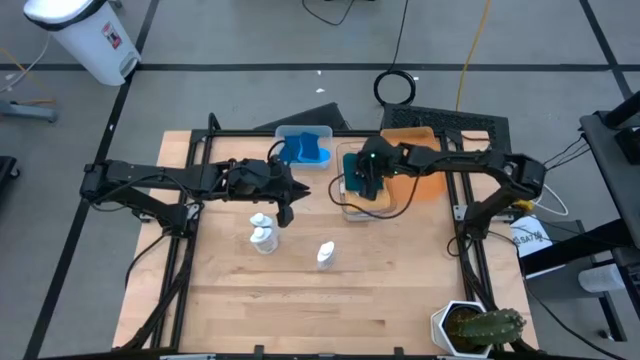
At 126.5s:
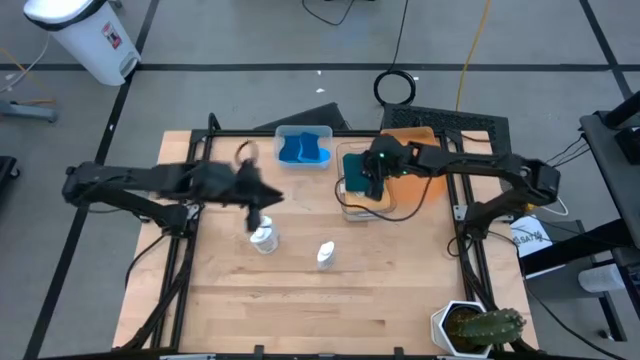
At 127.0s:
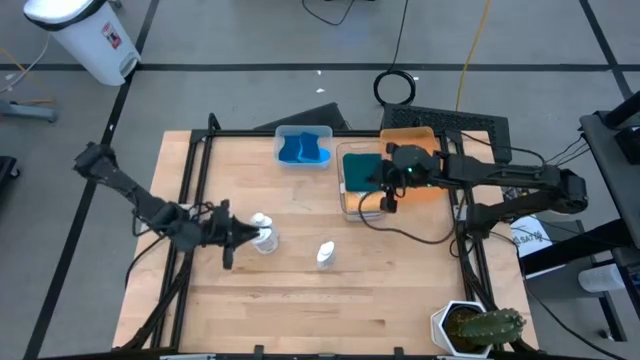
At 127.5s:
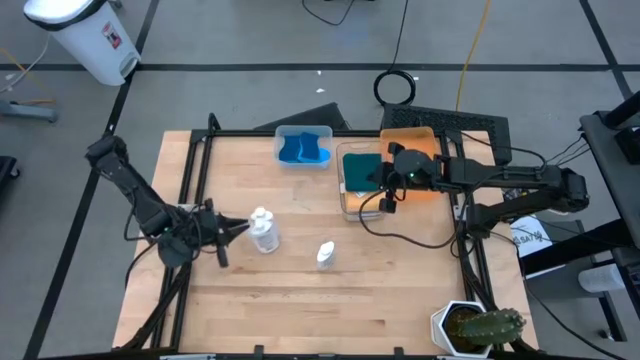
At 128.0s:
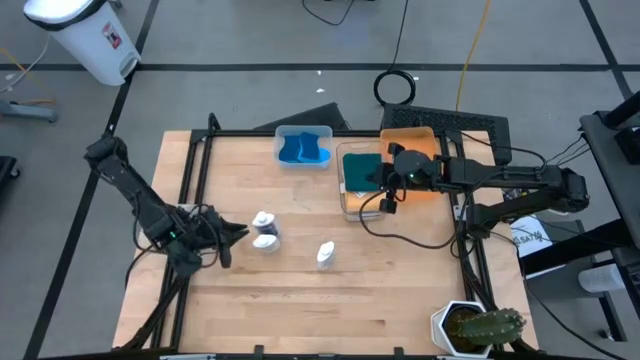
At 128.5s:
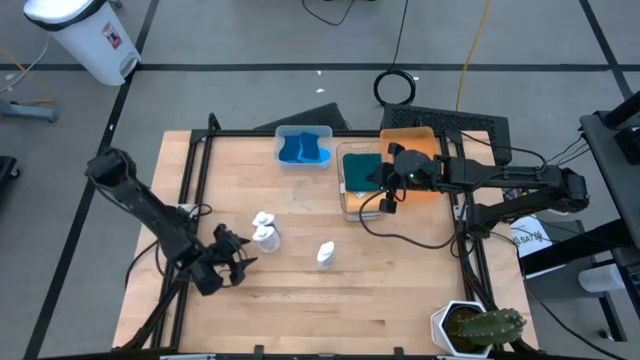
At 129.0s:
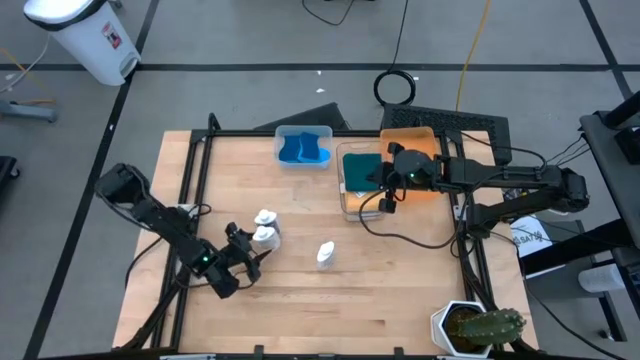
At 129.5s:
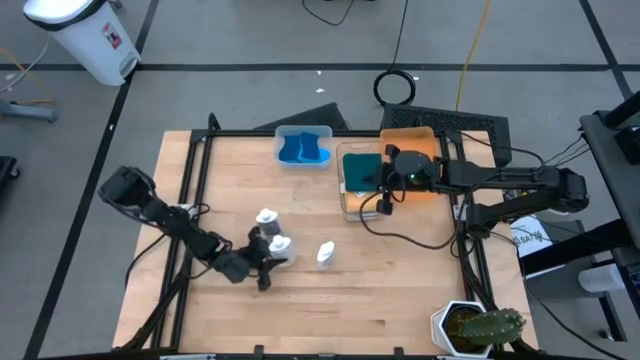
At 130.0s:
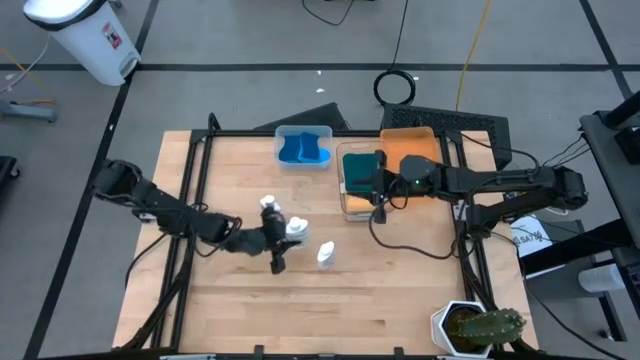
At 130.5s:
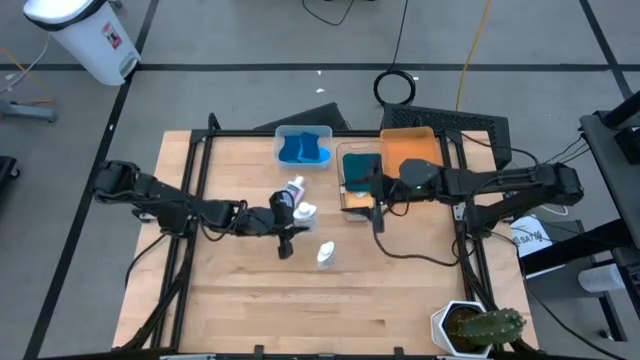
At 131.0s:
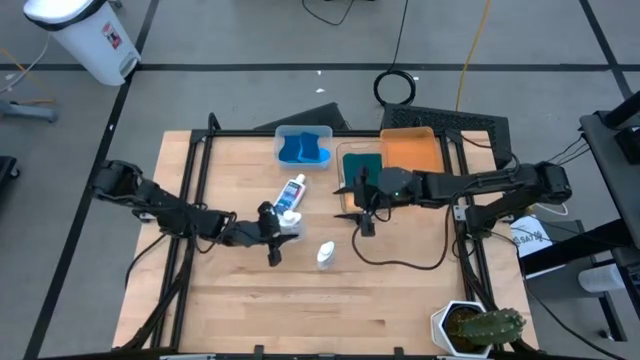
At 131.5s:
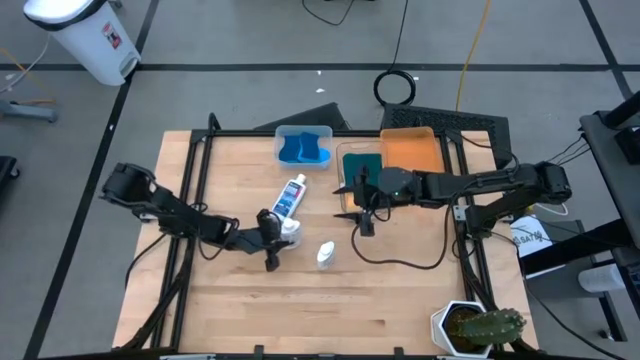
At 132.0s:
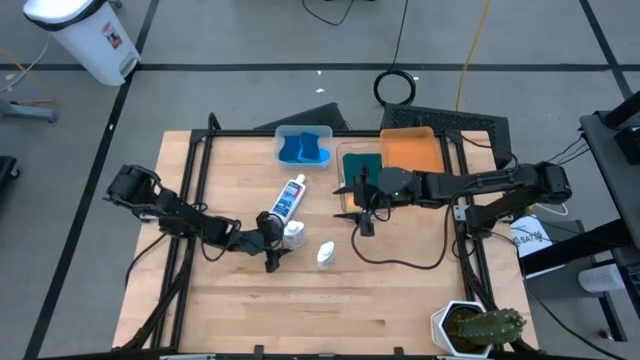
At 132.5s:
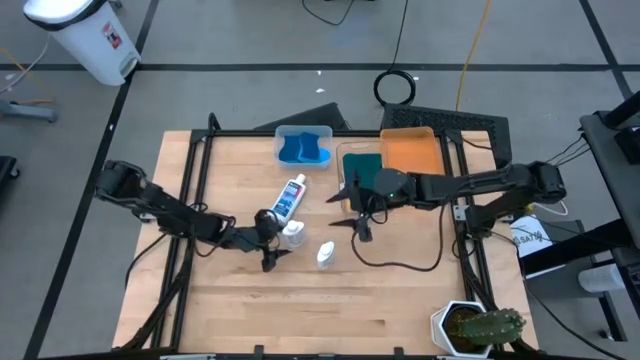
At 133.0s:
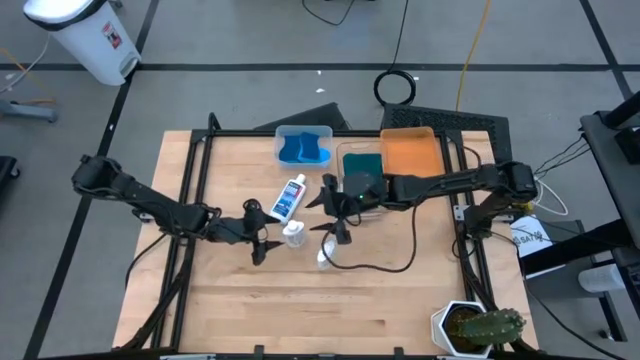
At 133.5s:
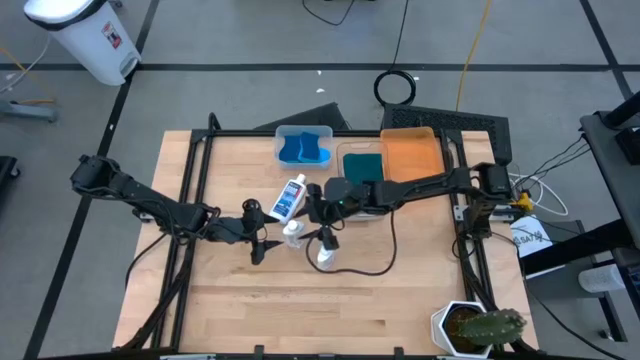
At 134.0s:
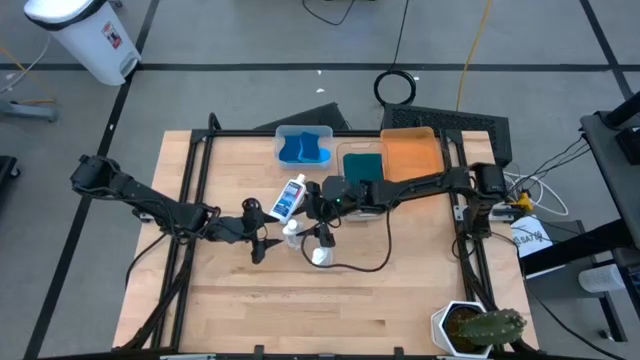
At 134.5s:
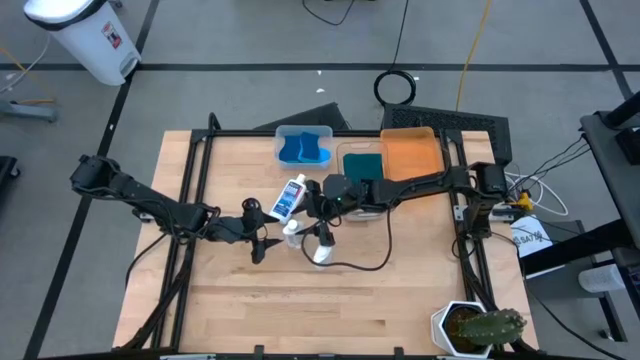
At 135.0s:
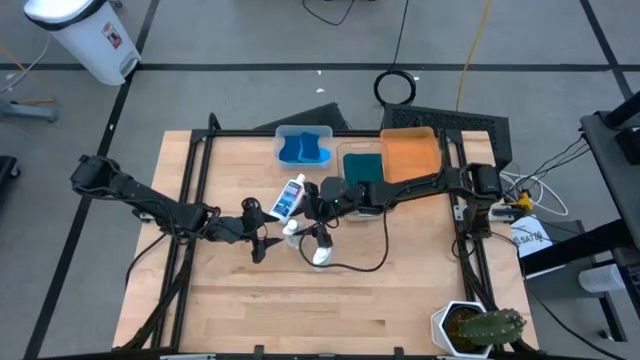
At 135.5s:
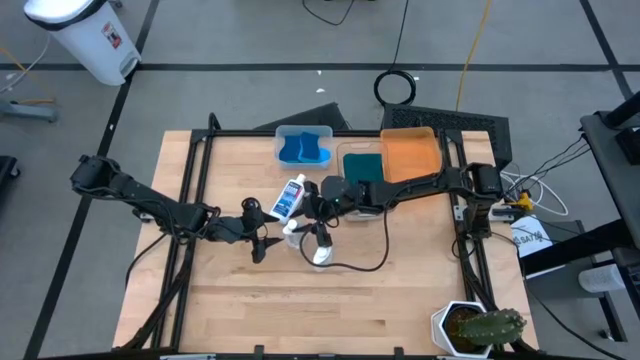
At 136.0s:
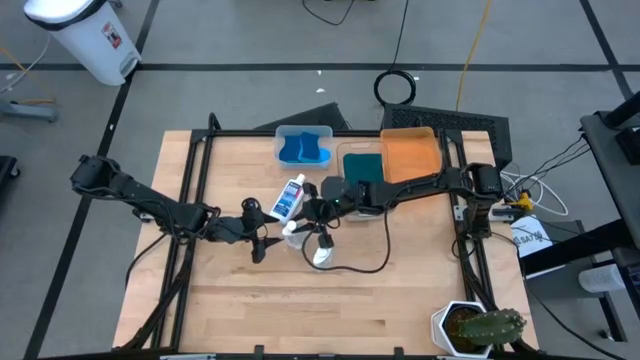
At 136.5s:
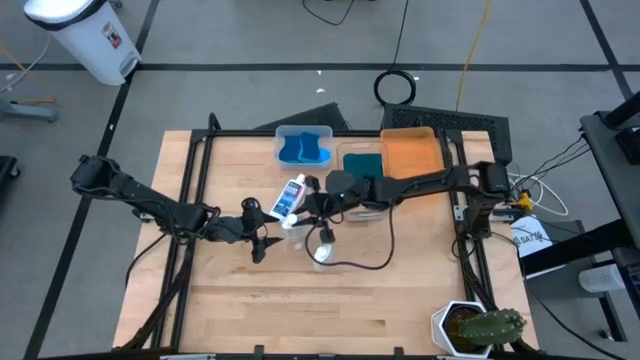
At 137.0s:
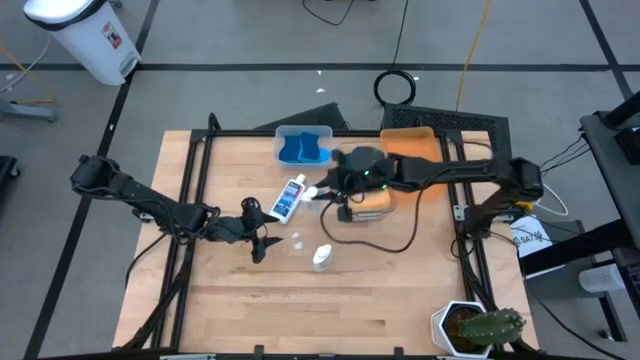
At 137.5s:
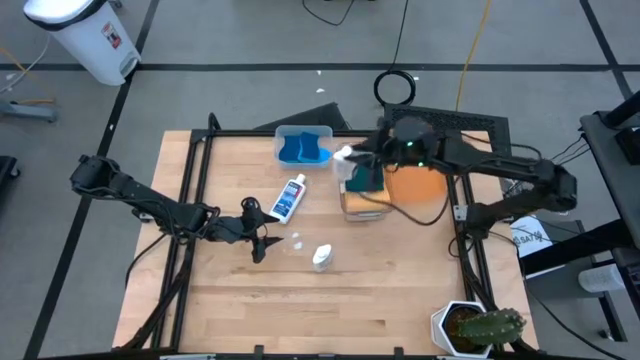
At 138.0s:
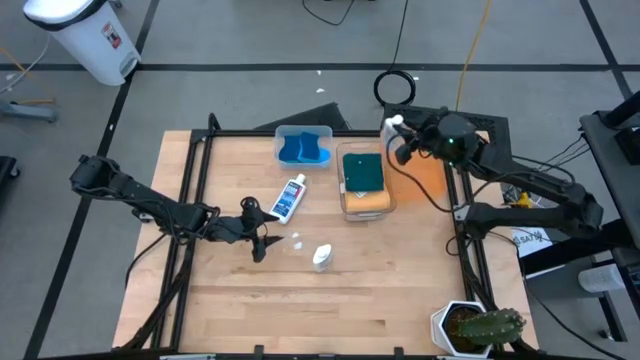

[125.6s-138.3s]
Task: Pick & Place Kitchen Items
Put the white plastic restorer bottle into the orange bin

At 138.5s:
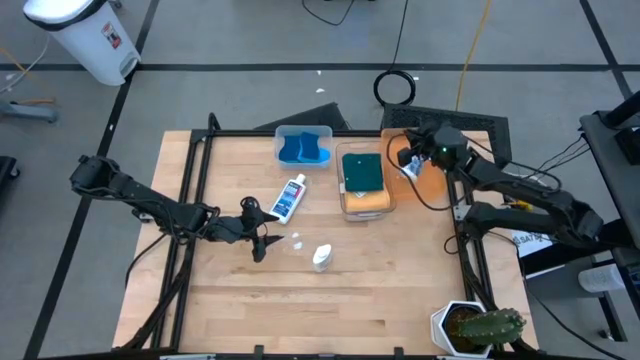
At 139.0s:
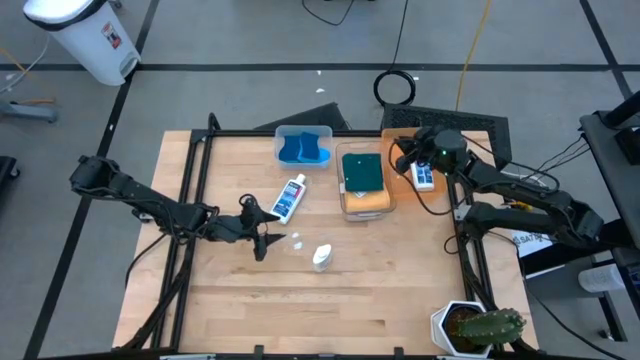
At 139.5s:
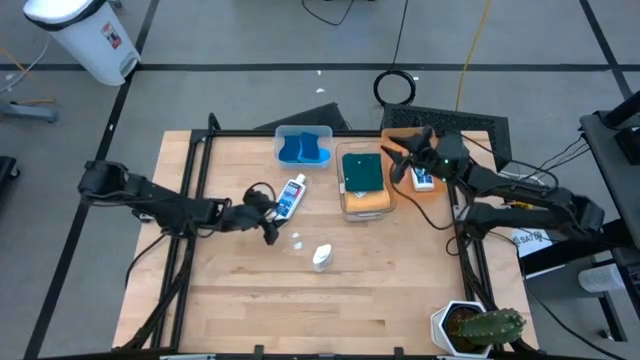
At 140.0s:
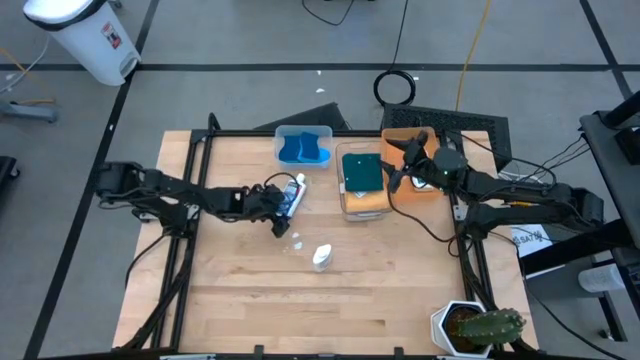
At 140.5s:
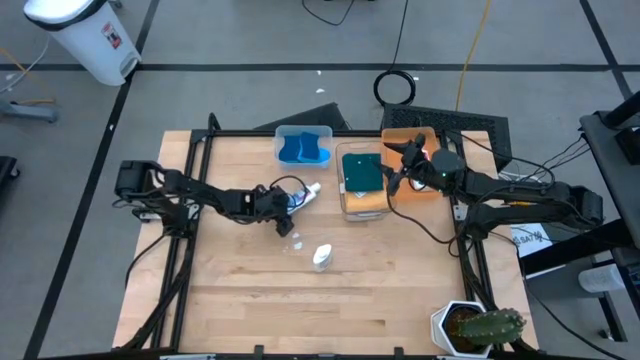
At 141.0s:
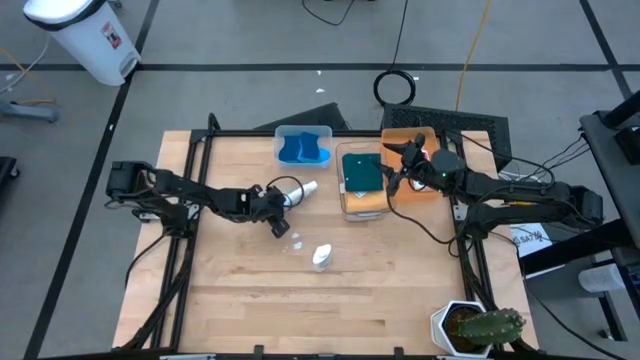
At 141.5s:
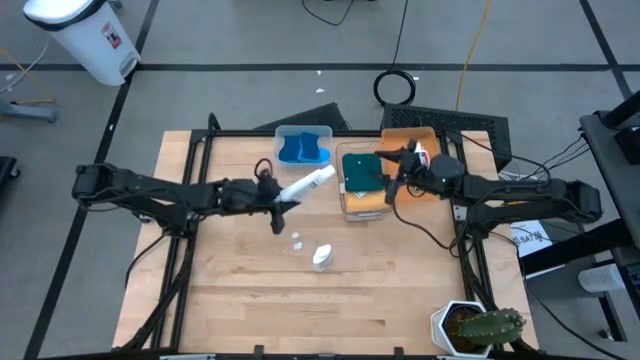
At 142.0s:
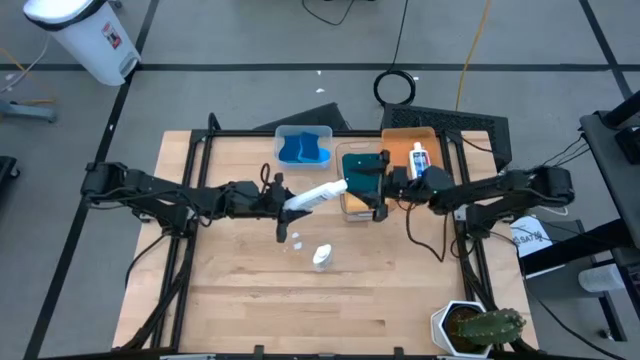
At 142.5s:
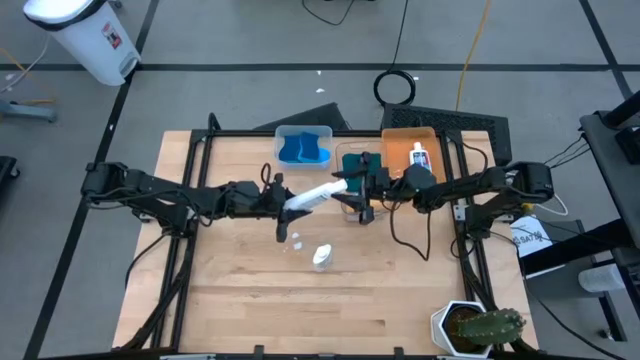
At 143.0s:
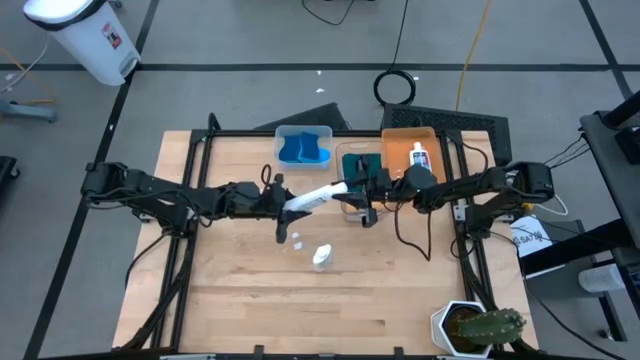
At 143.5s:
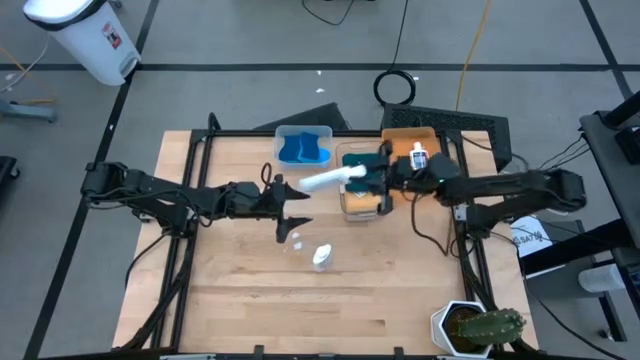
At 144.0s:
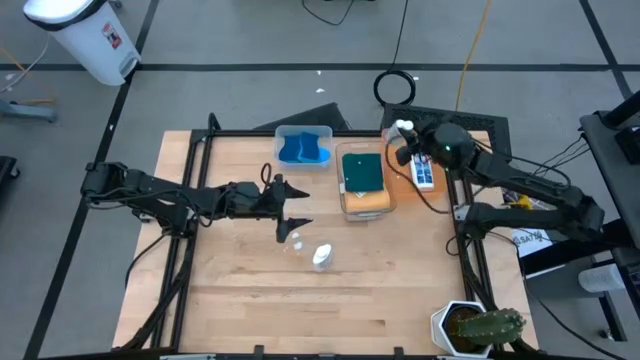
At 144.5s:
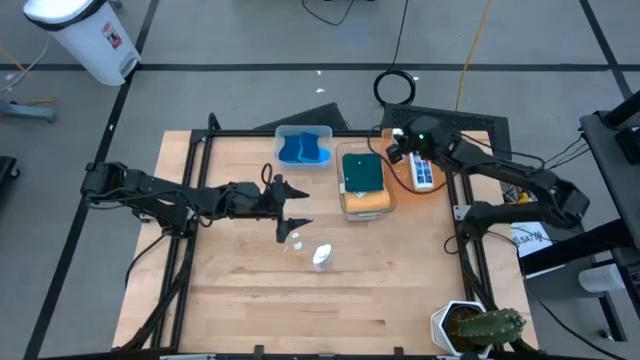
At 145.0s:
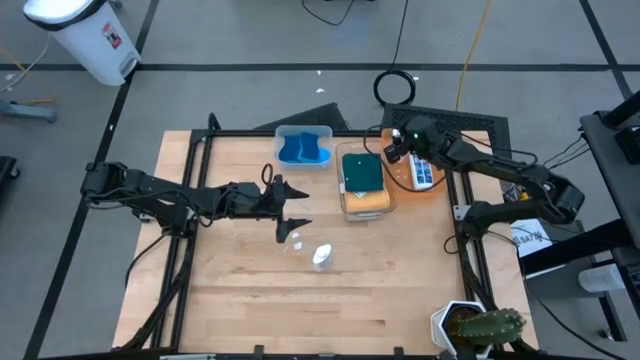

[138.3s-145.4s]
Put the white plastic restorer bottle into the orange bin

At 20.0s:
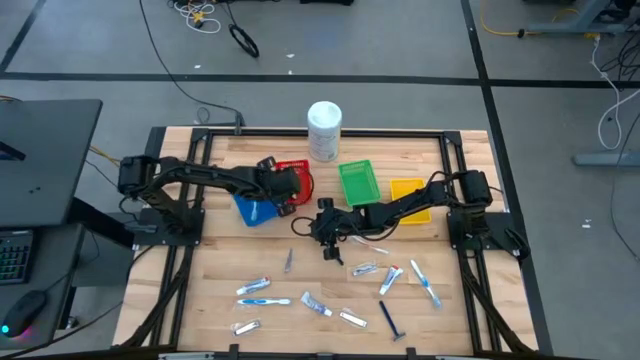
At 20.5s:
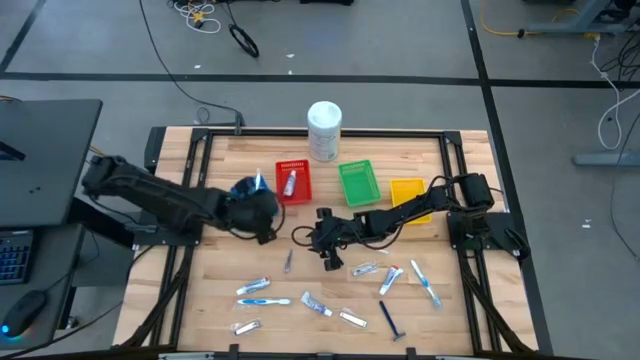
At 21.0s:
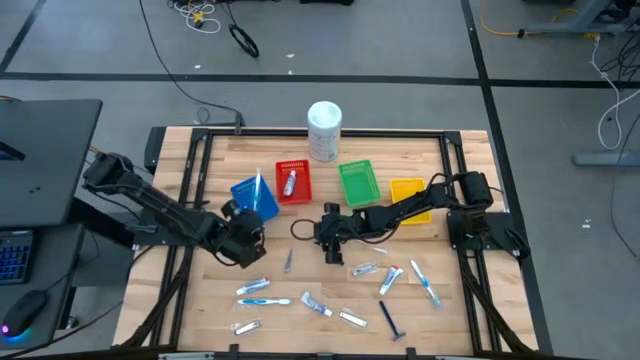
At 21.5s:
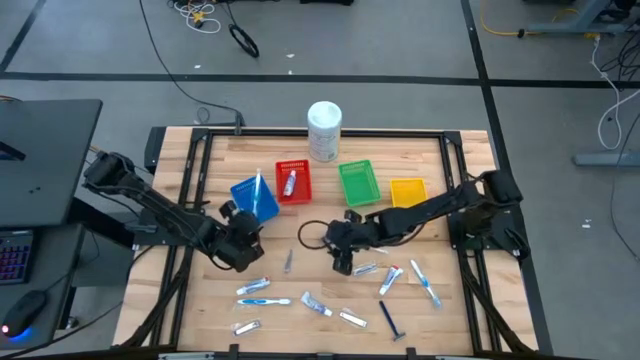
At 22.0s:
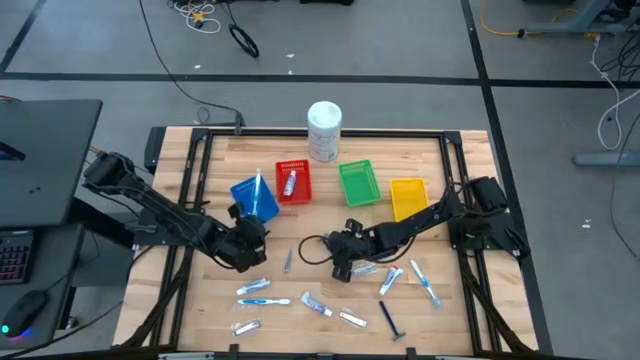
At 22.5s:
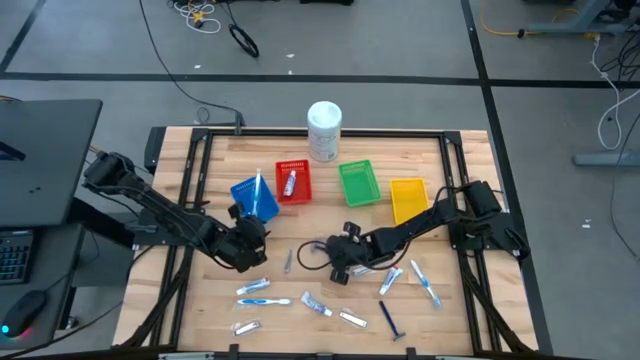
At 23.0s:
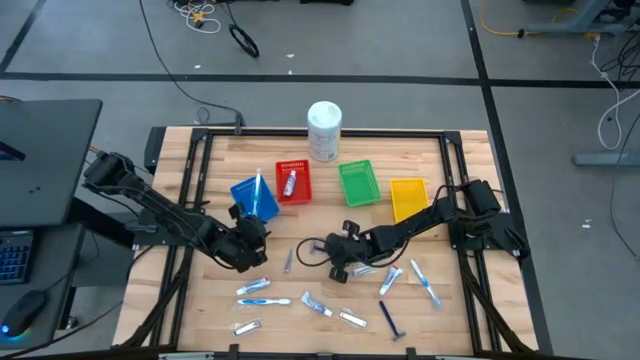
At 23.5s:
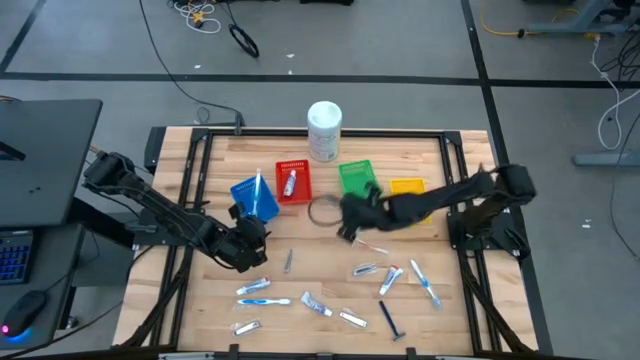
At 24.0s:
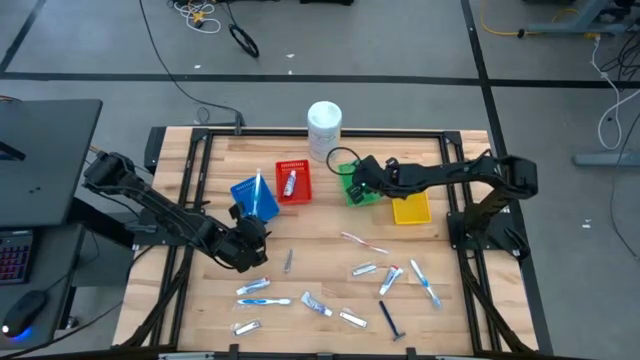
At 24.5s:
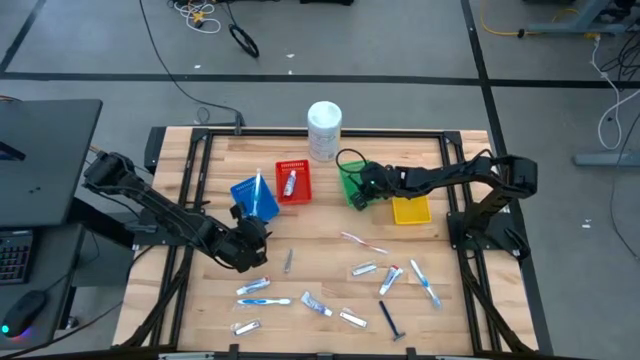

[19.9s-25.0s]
Task: Pick & Place Travel size toiletries
Put the blue razor into the green bin
